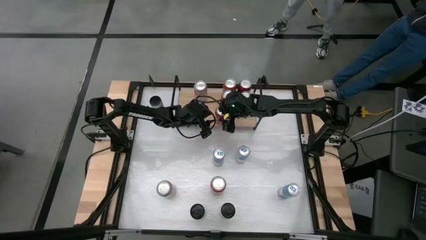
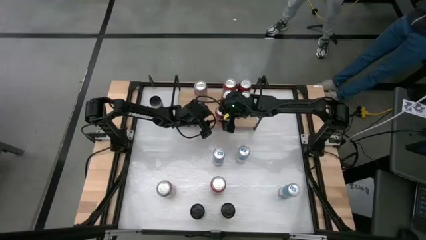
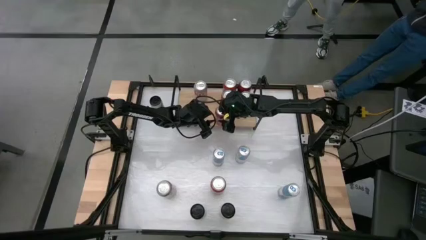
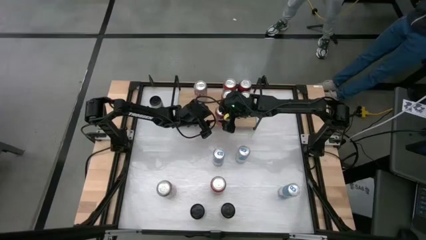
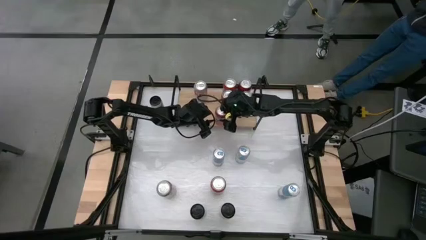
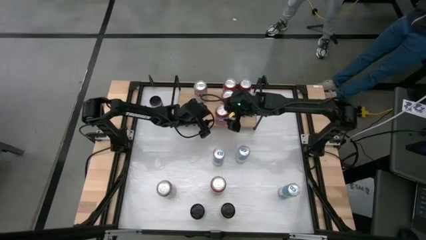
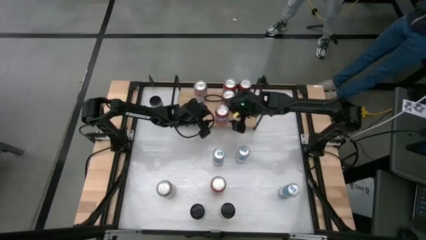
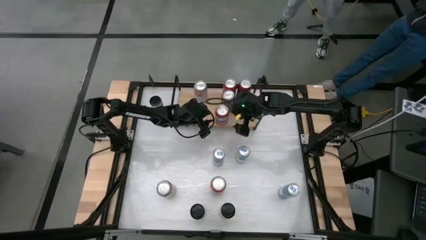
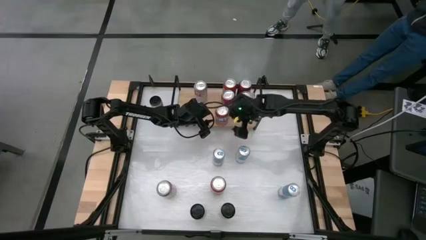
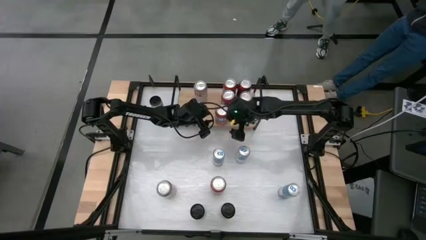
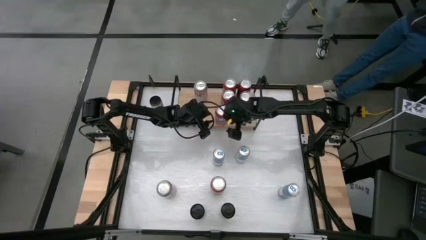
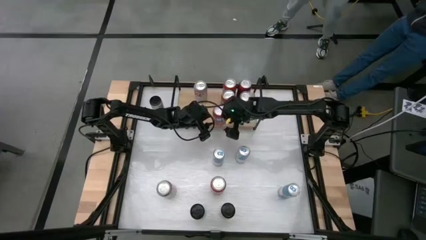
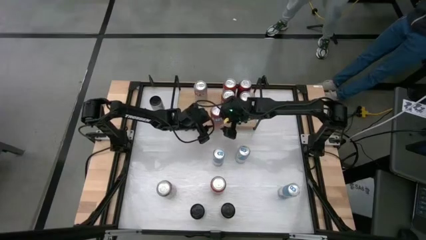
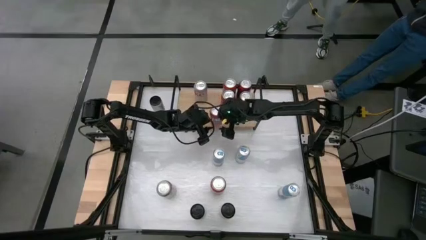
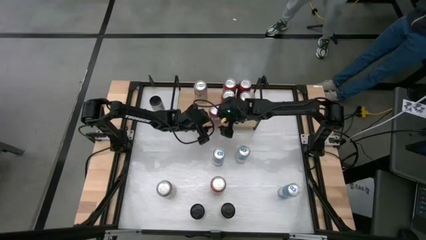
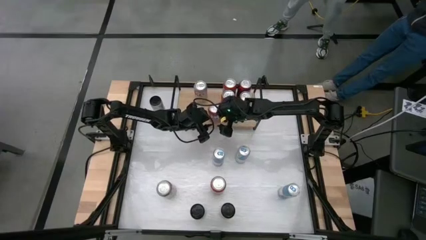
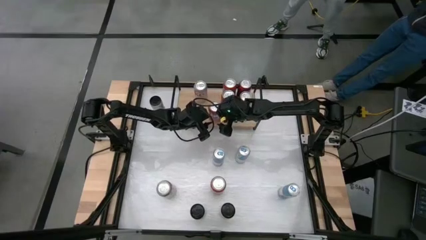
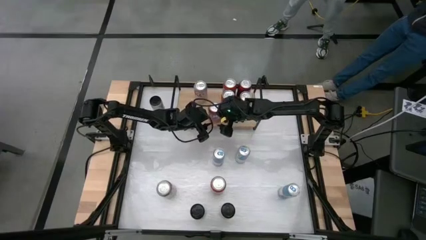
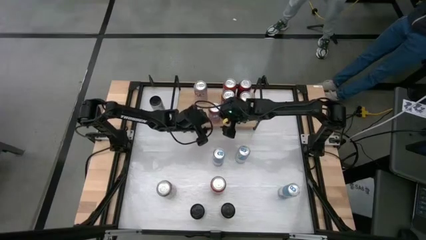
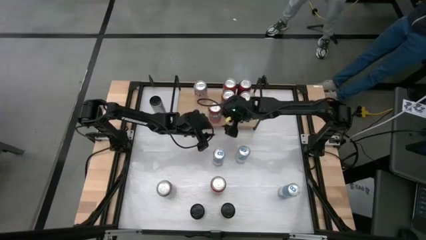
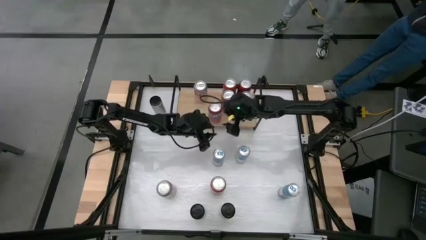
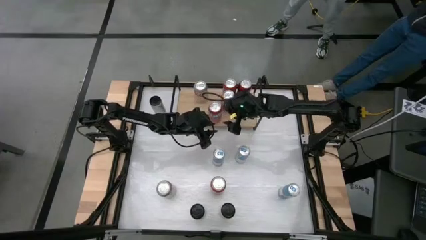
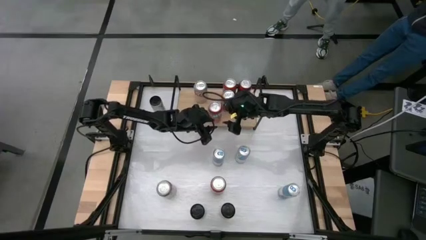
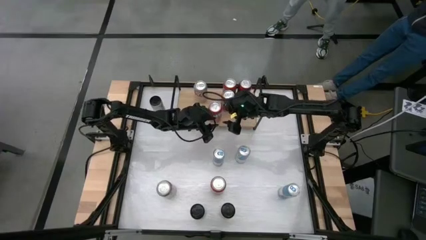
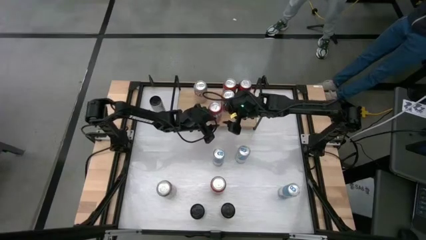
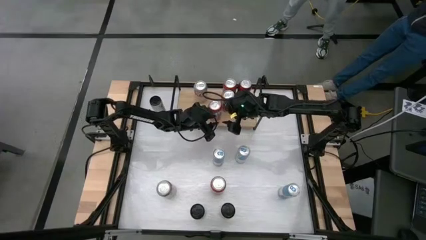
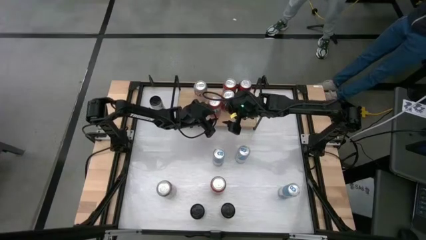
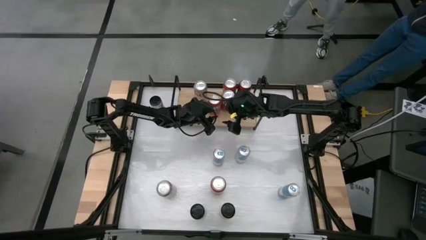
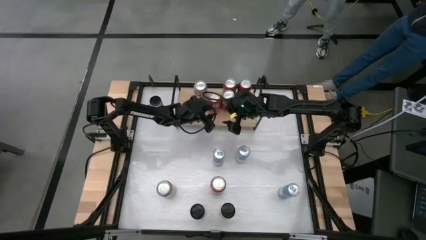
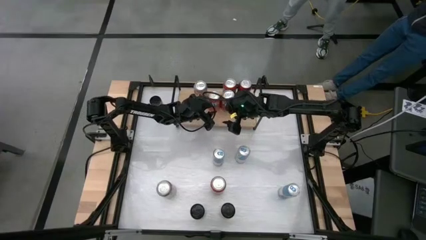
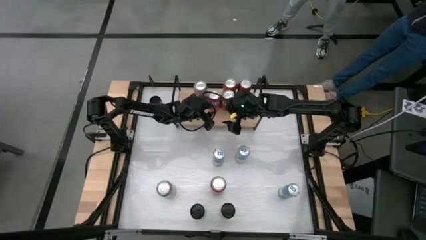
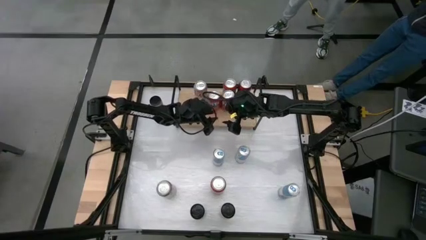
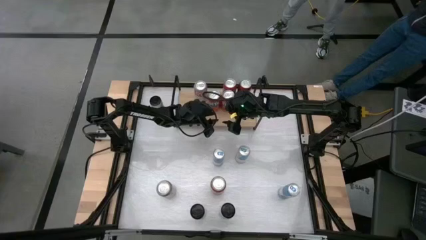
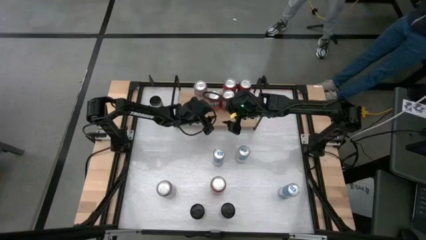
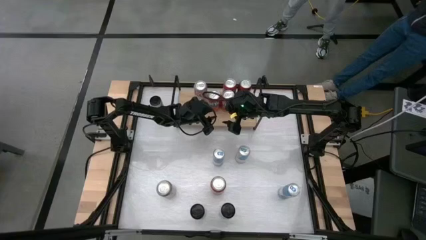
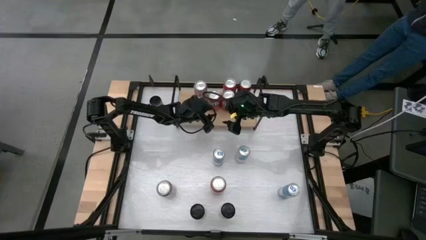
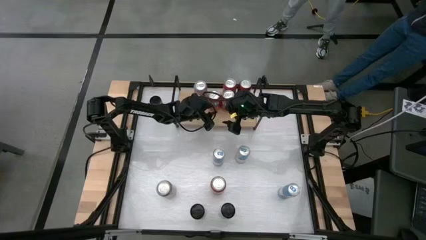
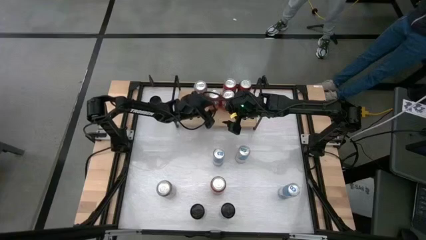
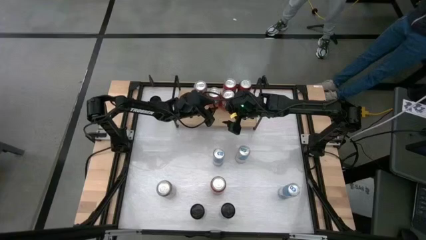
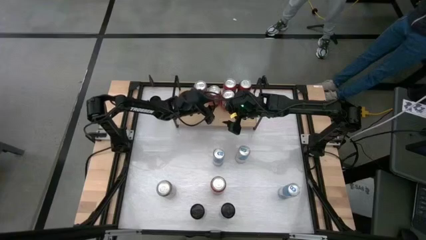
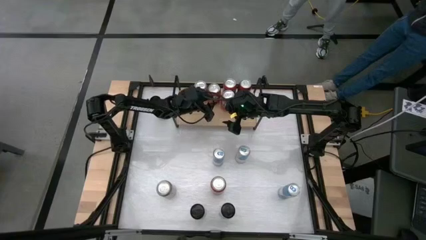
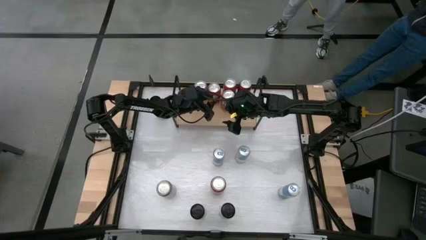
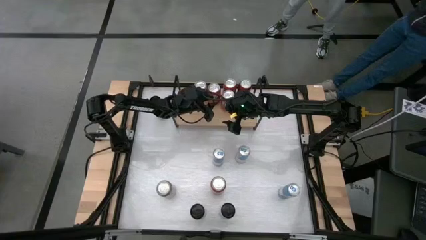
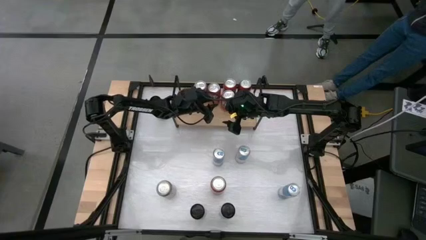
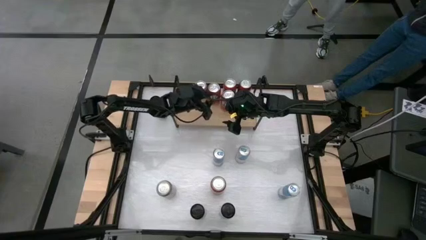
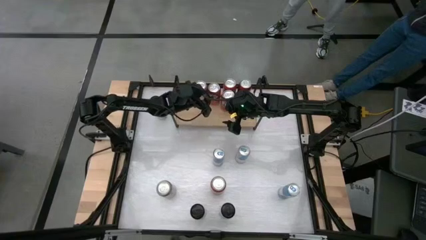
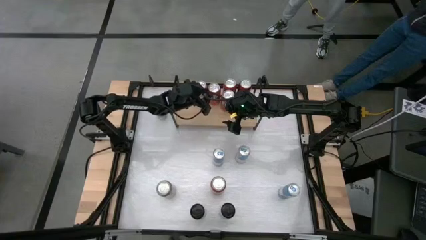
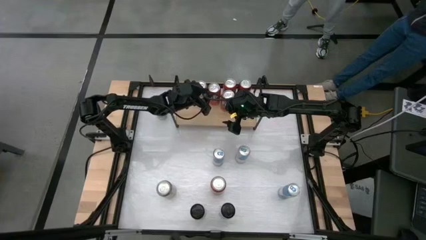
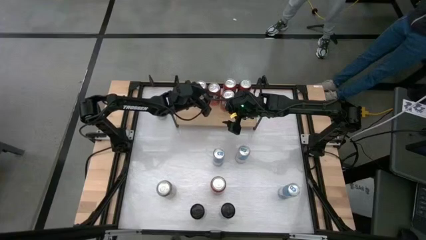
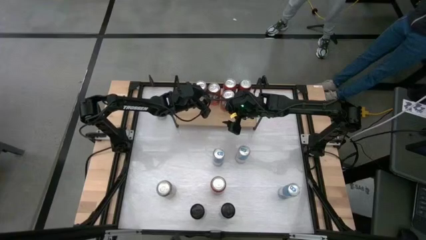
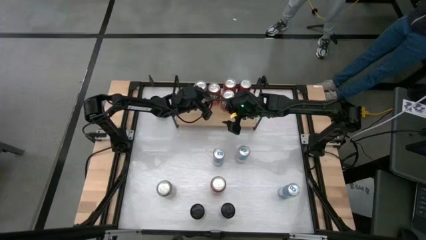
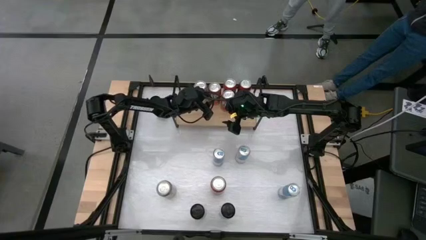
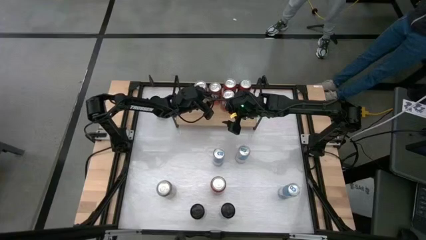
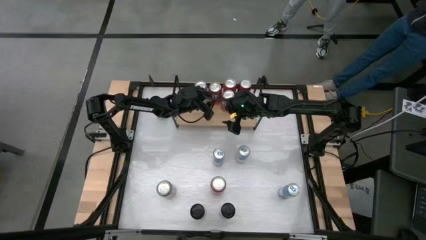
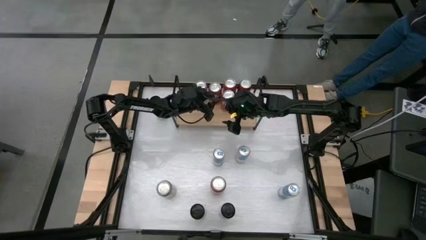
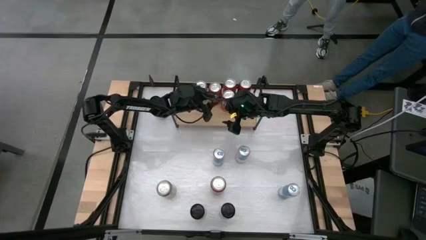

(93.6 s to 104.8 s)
Task: Place canned beverage on shelf
Put the pink soda can on the shelf
